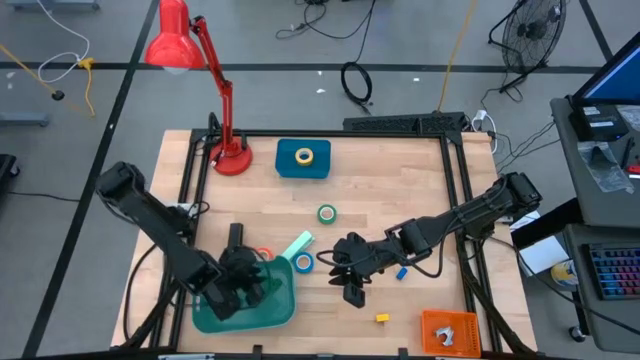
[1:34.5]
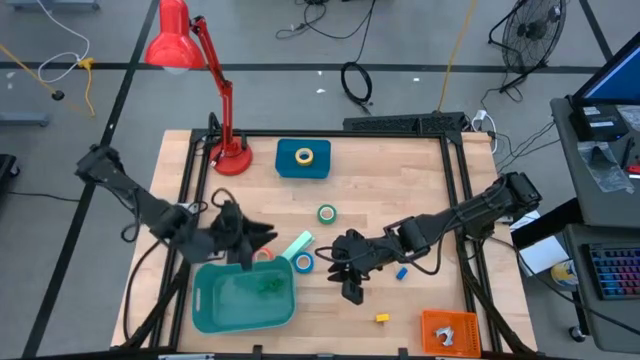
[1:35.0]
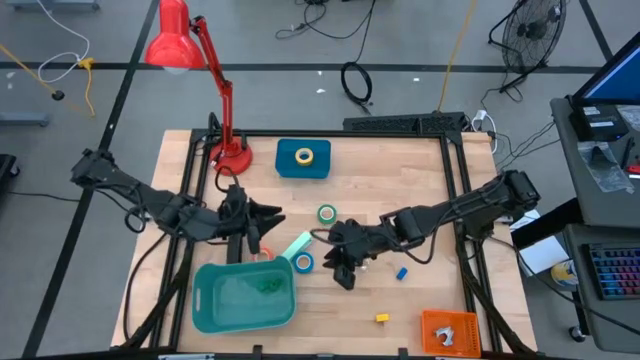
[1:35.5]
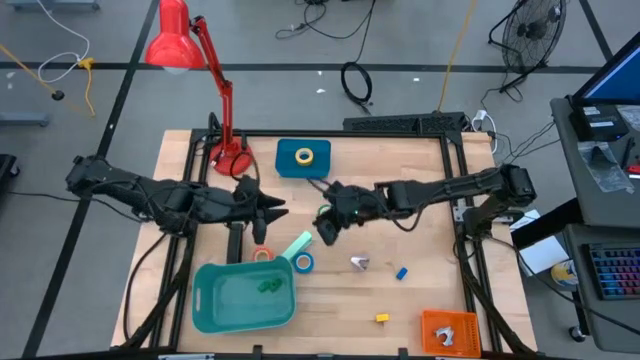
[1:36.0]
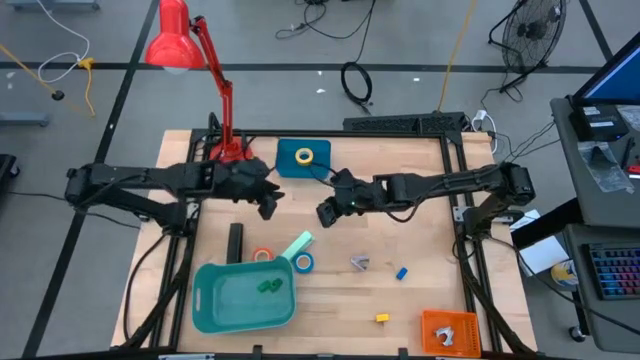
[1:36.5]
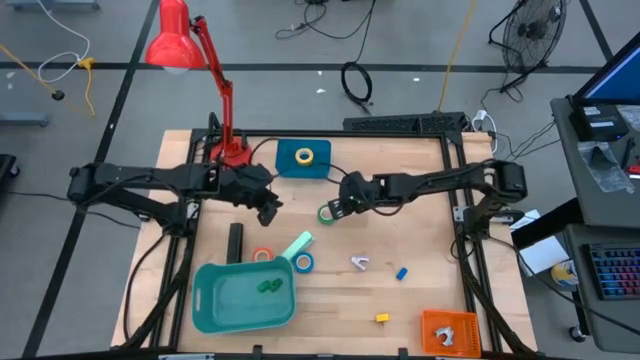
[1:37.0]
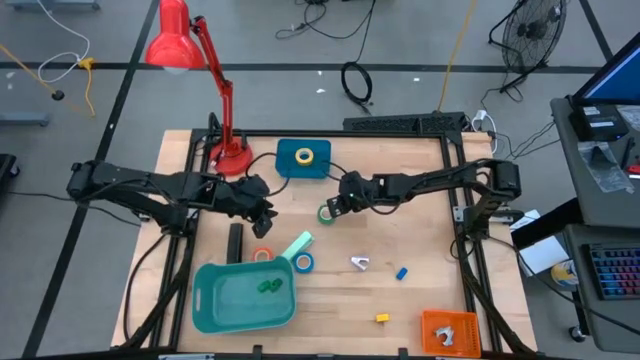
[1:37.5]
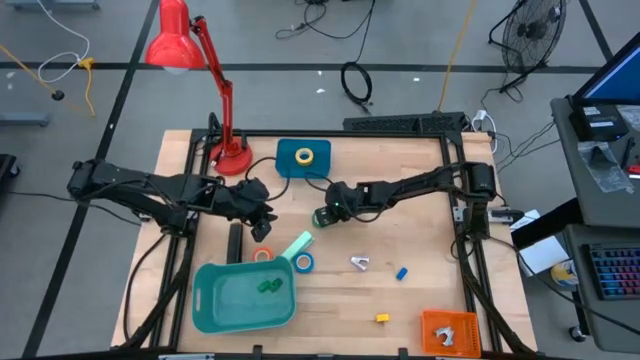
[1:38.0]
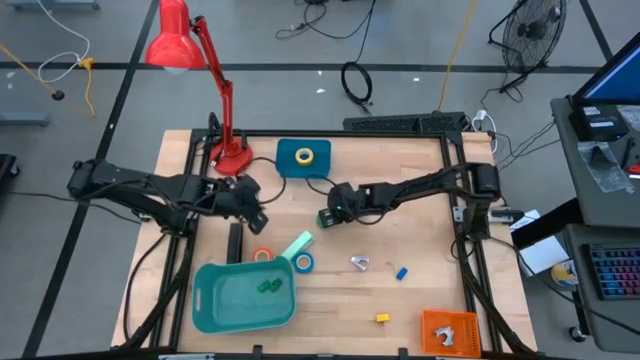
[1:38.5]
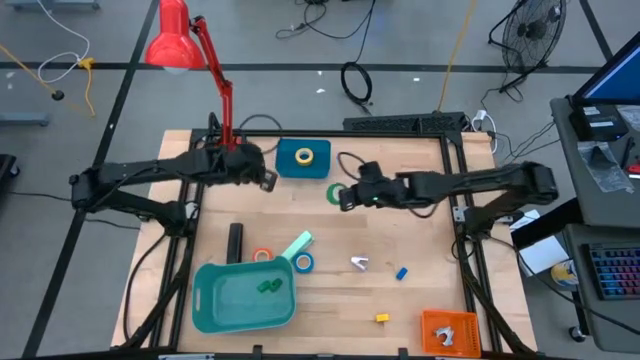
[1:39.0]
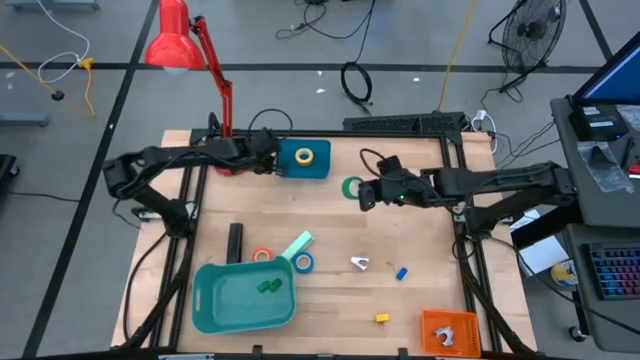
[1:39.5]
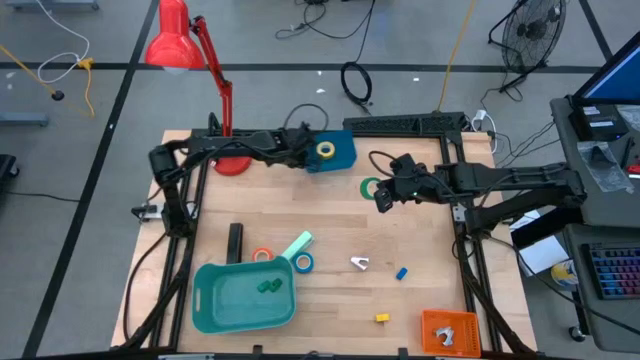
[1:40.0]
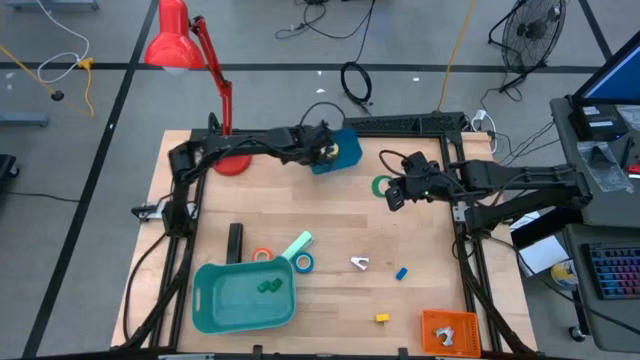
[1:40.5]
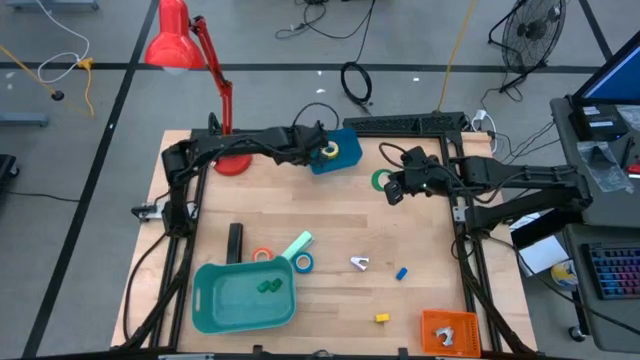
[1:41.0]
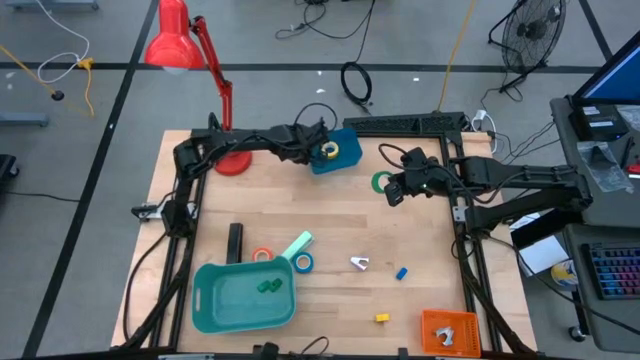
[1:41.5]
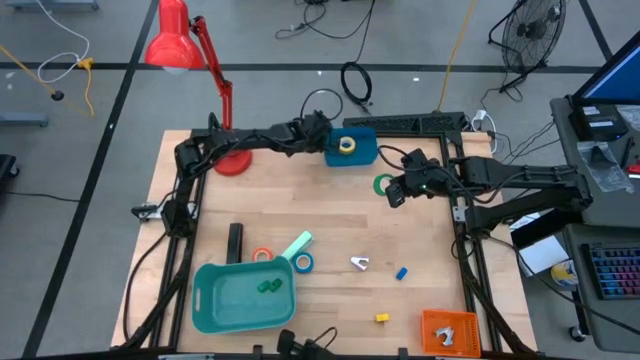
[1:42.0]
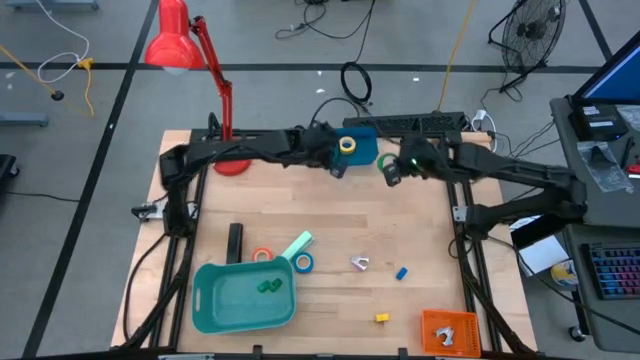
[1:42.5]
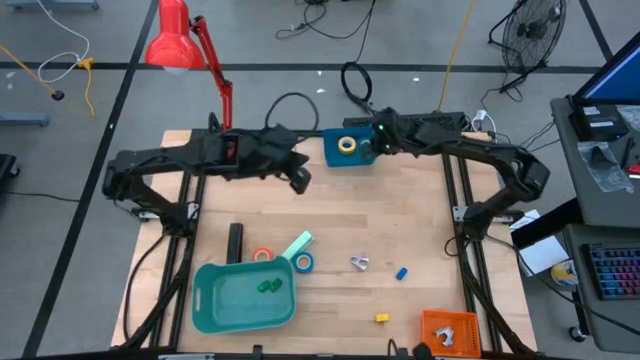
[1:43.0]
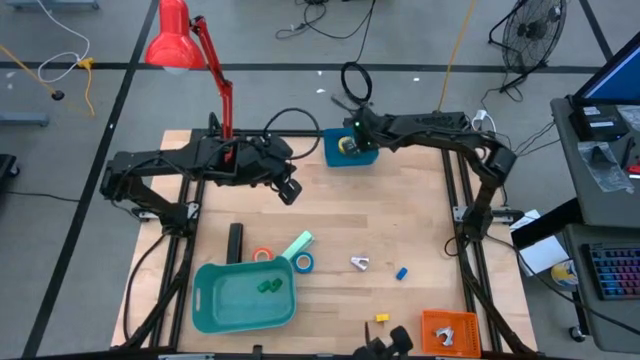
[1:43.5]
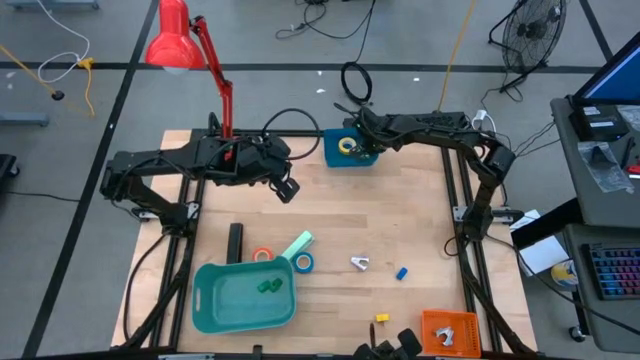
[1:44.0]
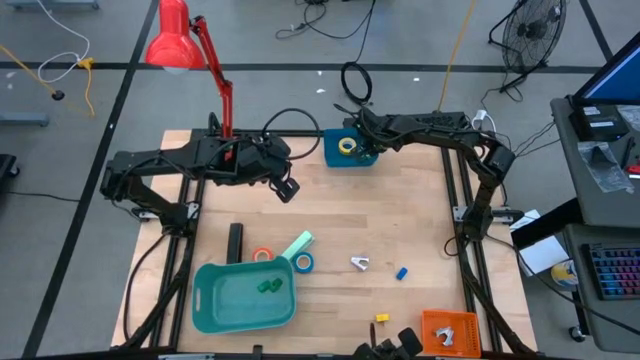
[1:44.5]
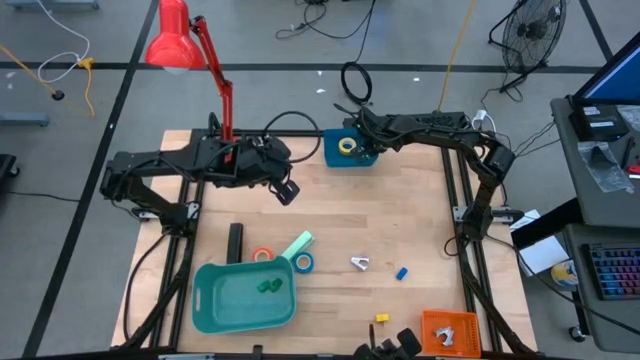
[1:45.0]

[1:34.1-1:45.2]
Task: Pick and place Stapler, Stapler remover, tape
Put the green tape into the blue bin

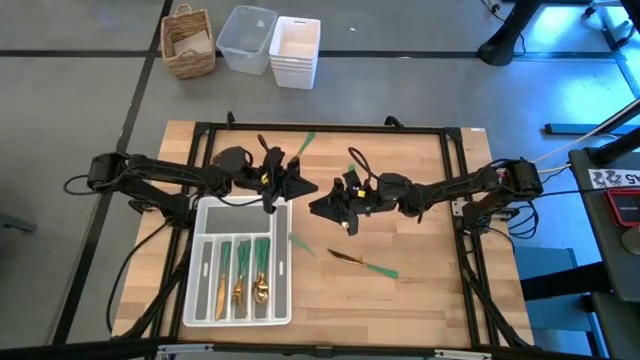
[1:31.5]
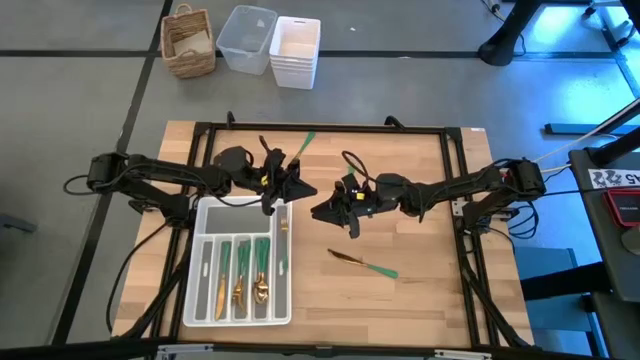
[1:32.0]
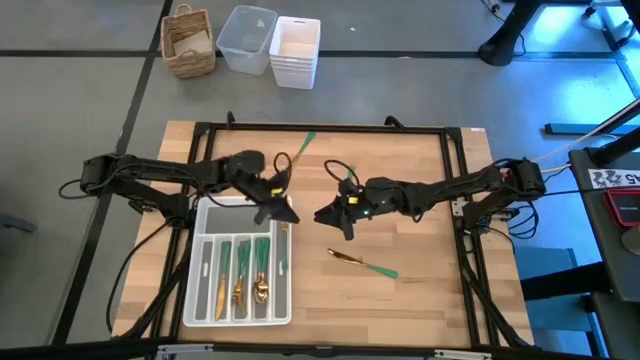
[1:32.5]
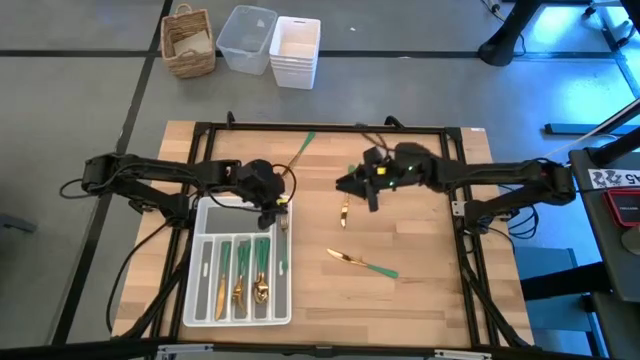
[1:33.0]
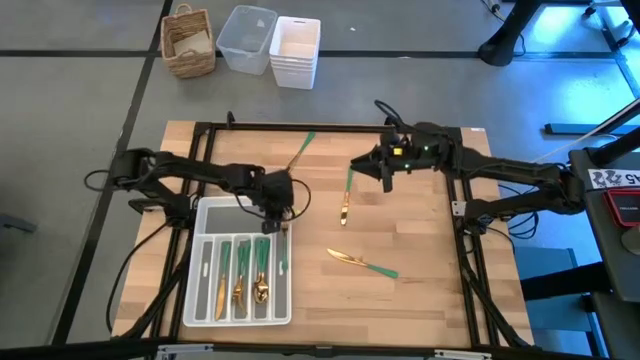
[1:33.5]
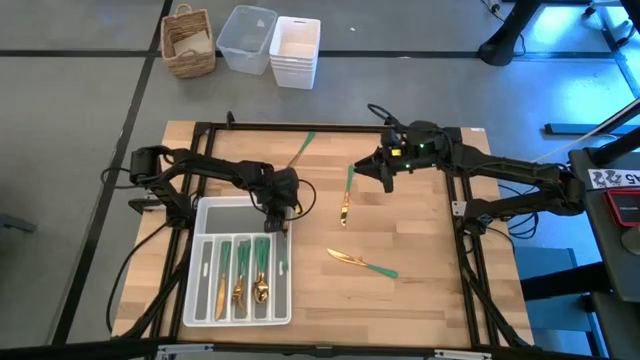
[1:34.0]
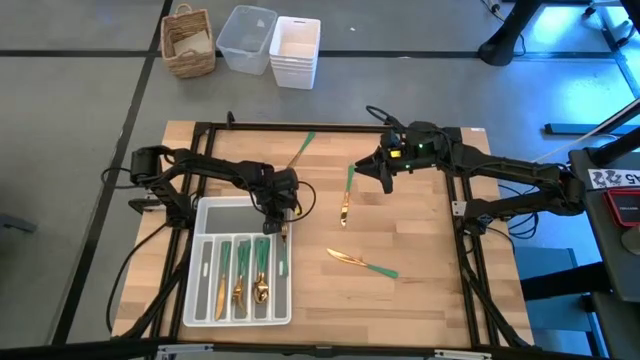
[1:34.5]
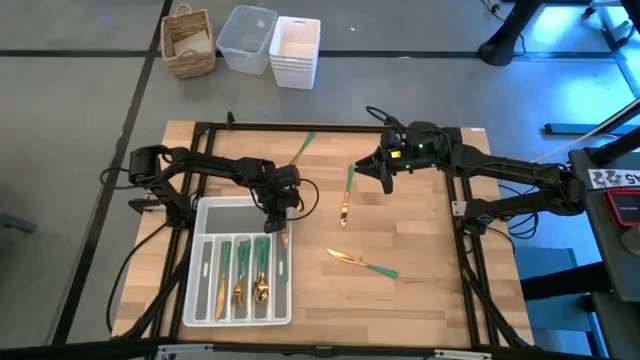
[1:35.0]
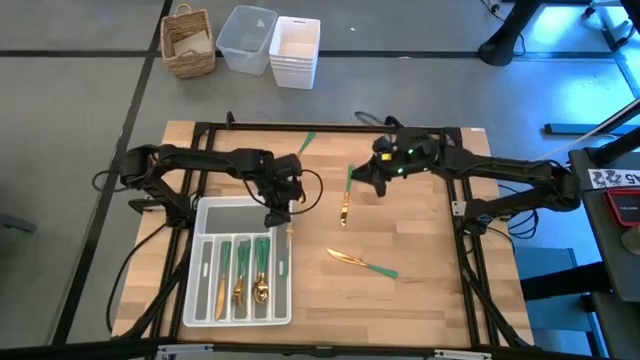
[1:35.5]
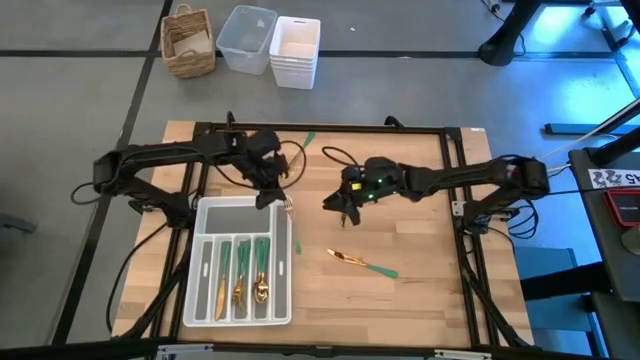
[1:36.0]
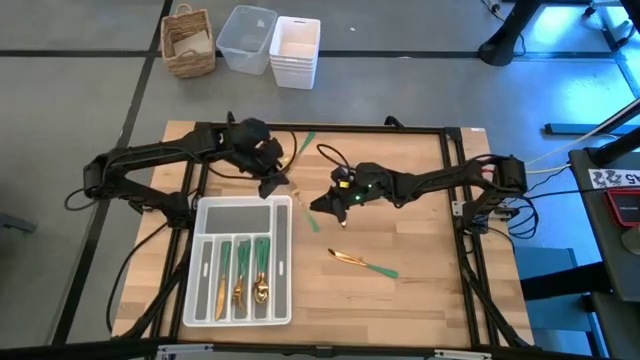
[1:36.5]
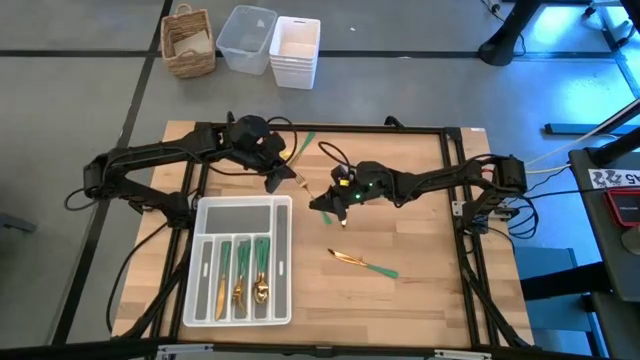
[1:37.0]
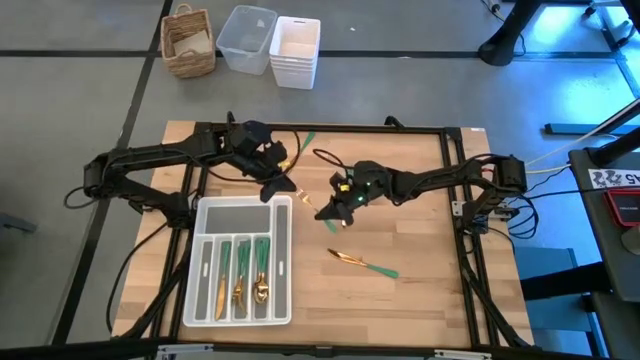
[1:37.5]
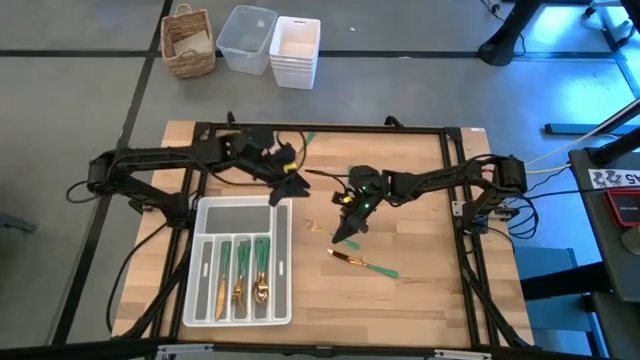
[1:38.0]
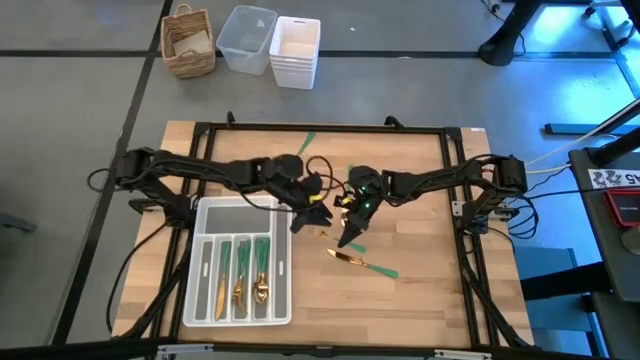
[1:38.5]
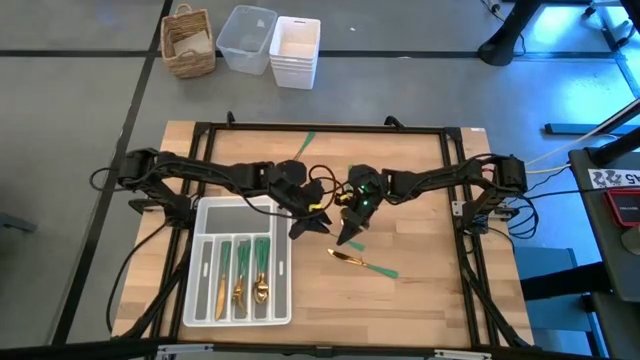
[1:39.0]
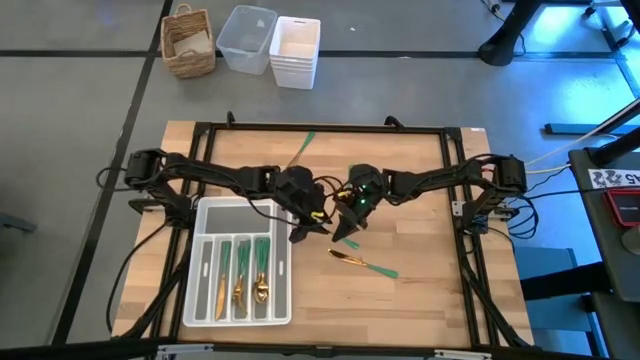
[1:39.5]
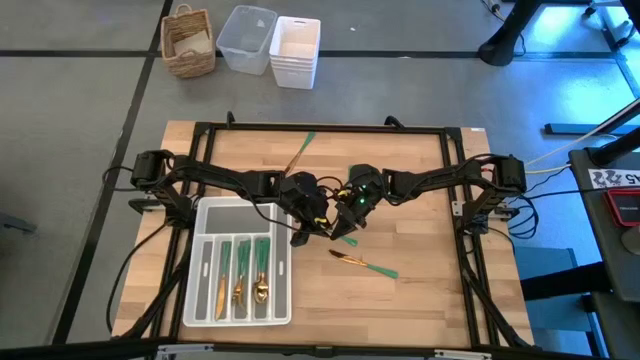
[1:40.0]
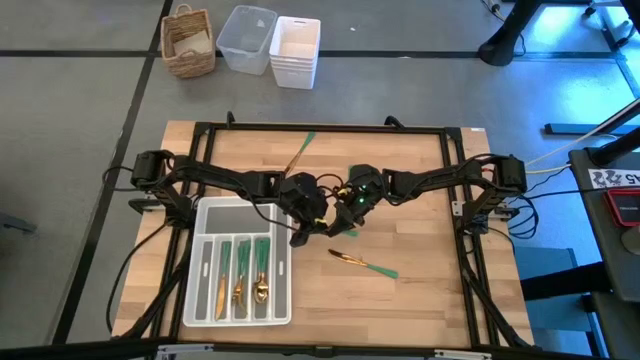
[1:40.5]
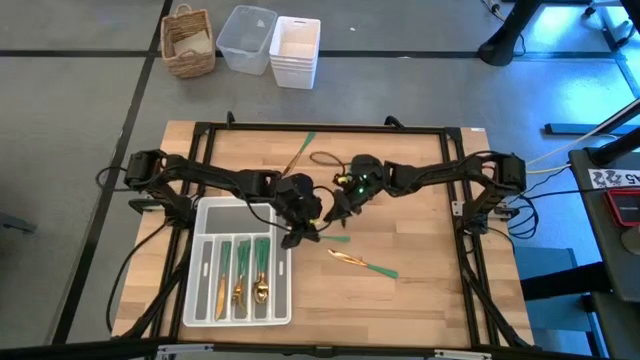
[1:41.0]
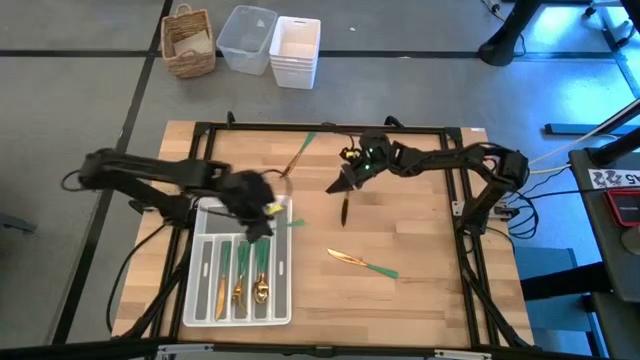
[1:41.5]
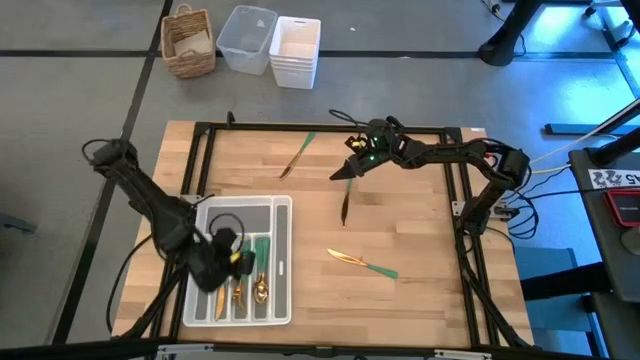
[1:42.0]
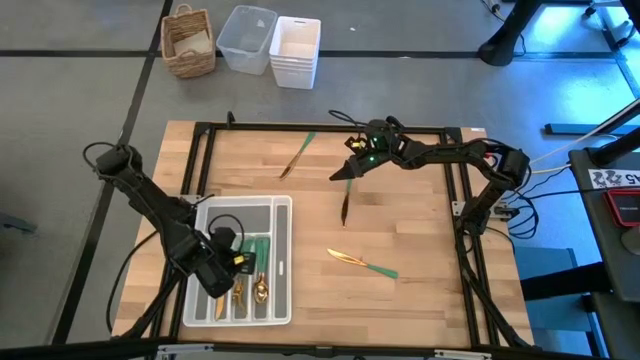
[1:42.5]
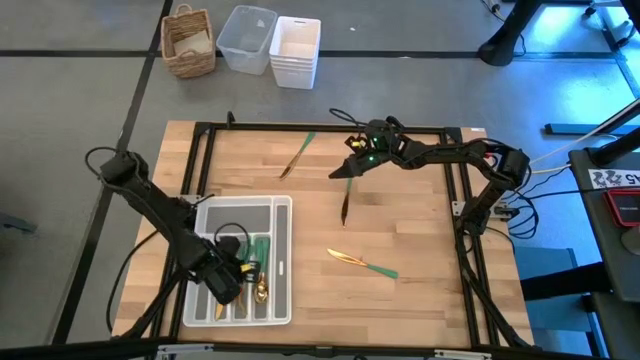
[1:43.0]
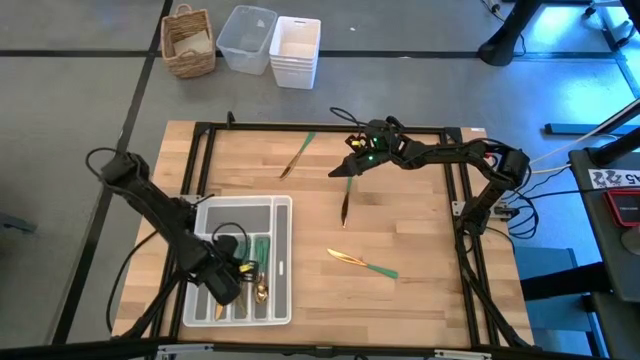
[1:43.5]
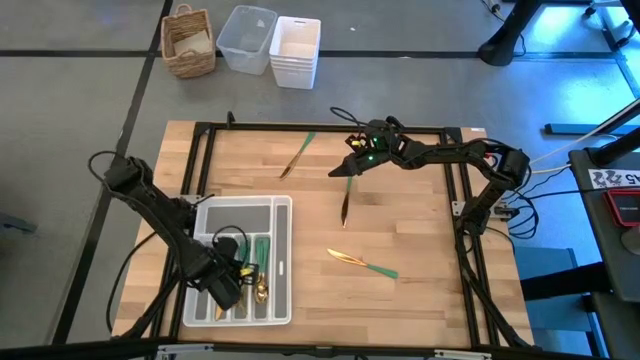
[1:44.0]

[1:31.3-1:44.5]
Task: Sort silverware
Put the green fork on the silverware tray
